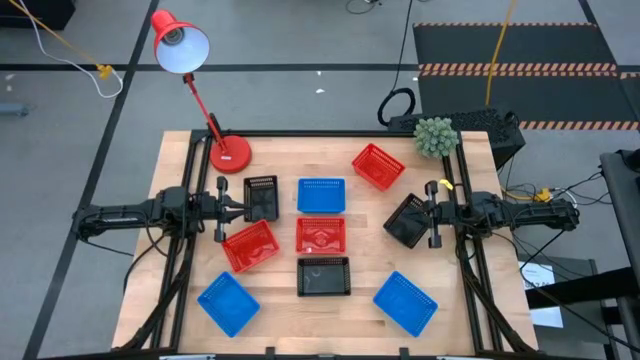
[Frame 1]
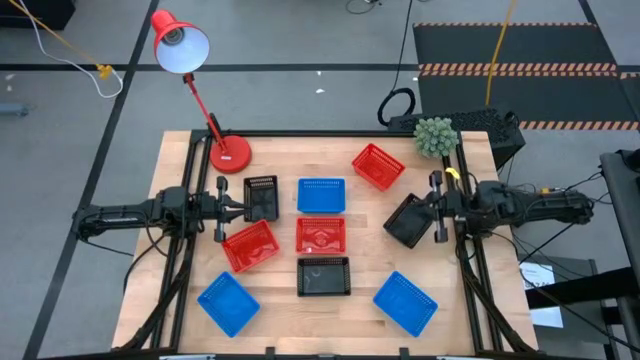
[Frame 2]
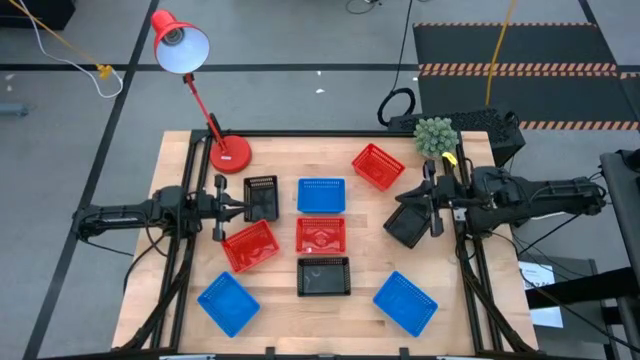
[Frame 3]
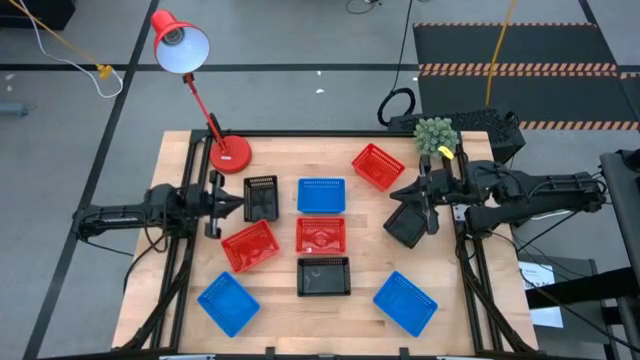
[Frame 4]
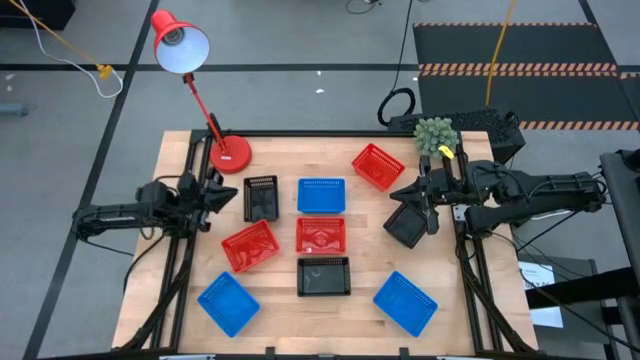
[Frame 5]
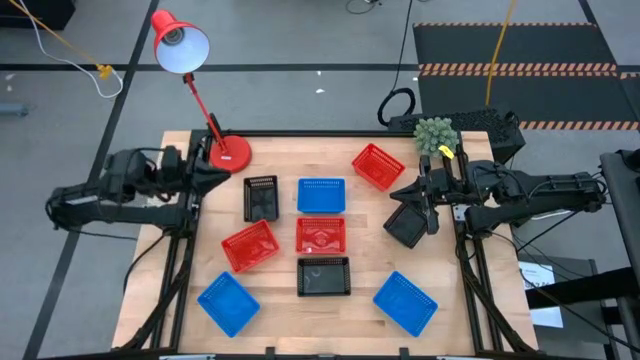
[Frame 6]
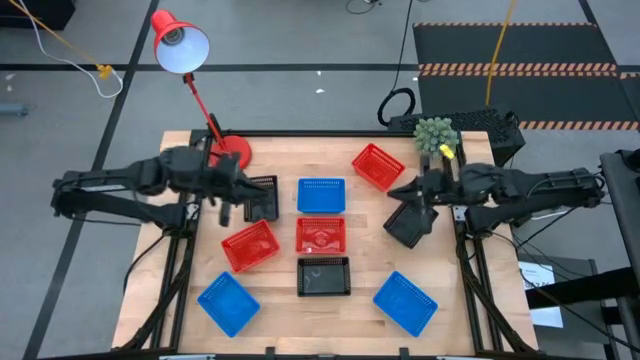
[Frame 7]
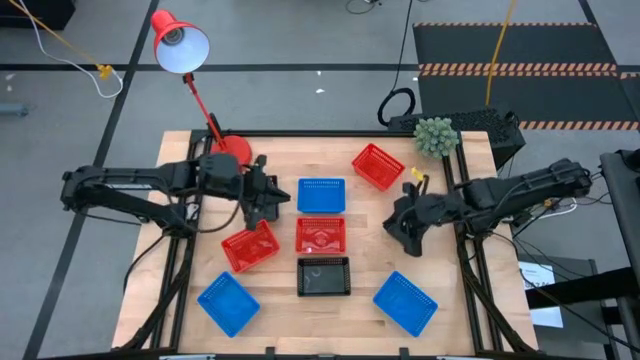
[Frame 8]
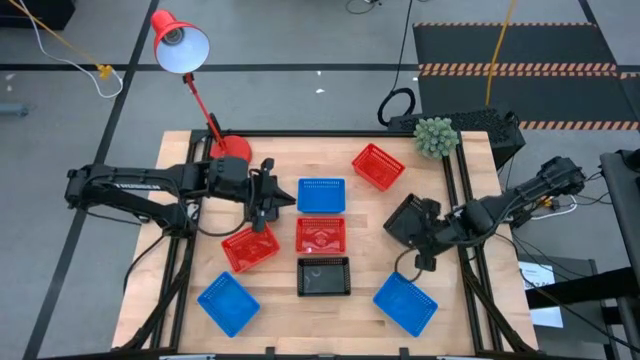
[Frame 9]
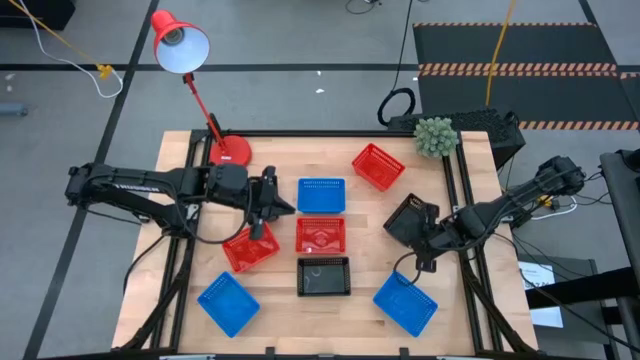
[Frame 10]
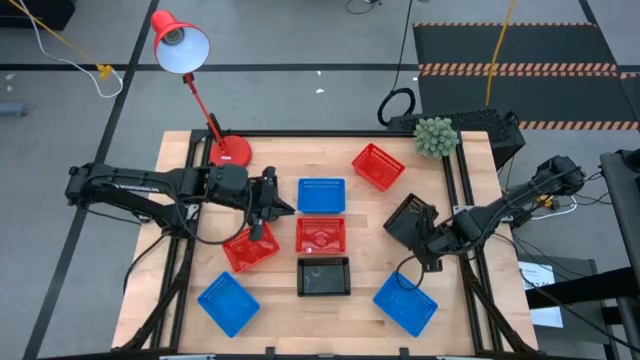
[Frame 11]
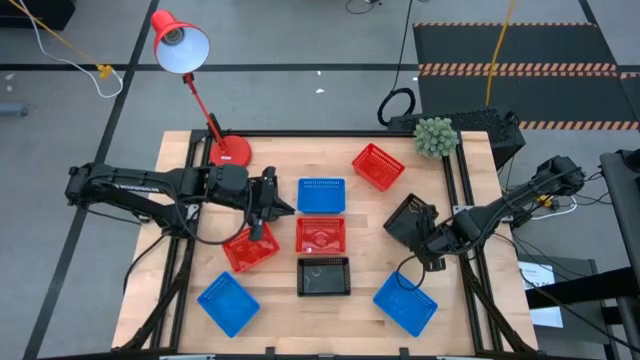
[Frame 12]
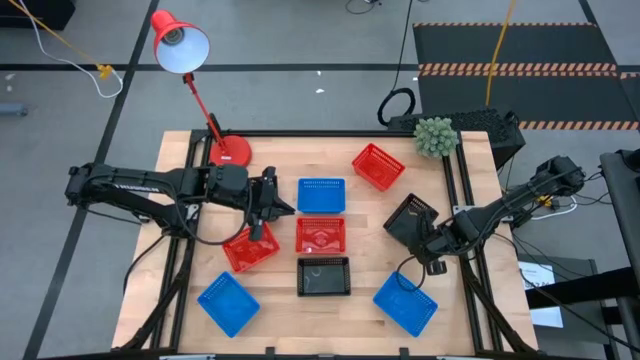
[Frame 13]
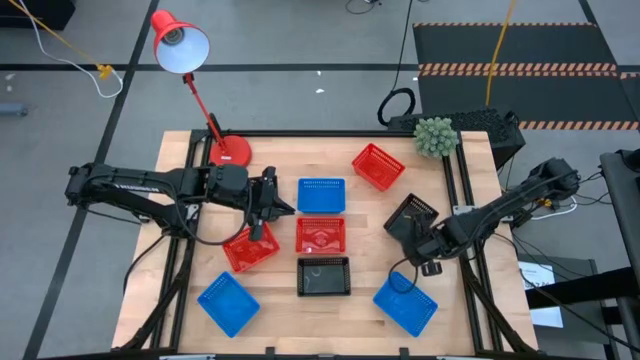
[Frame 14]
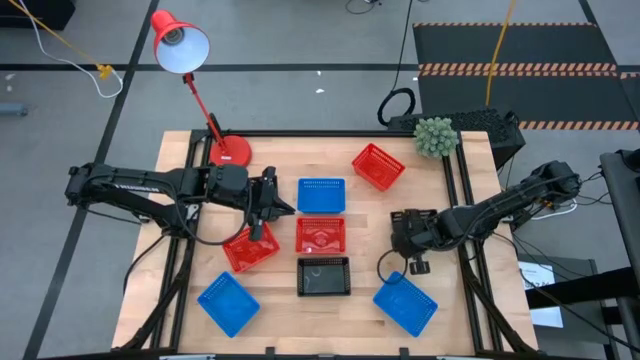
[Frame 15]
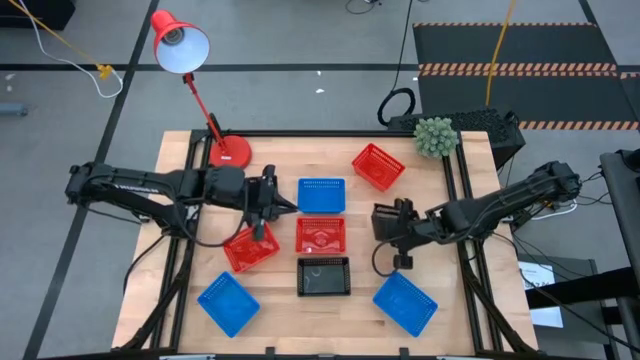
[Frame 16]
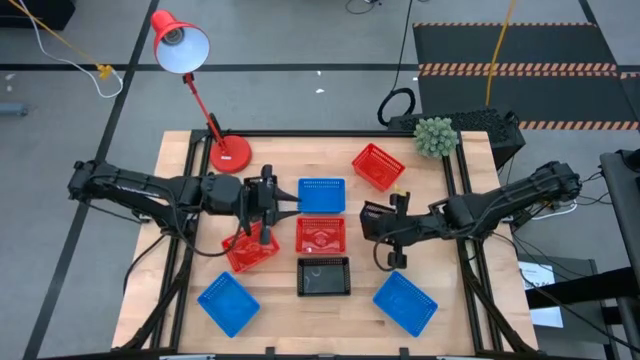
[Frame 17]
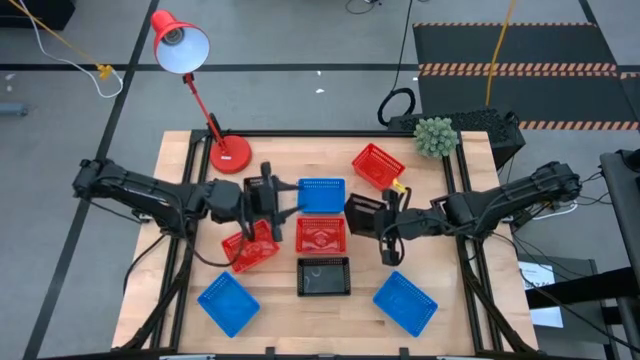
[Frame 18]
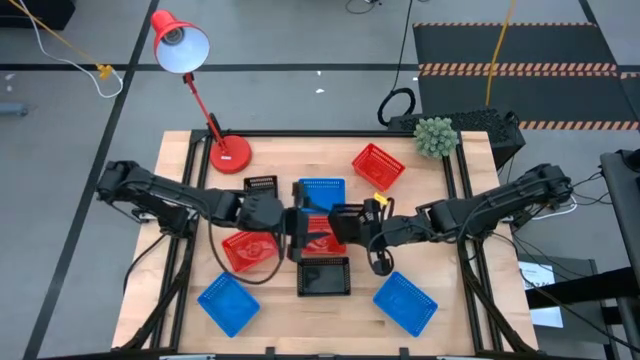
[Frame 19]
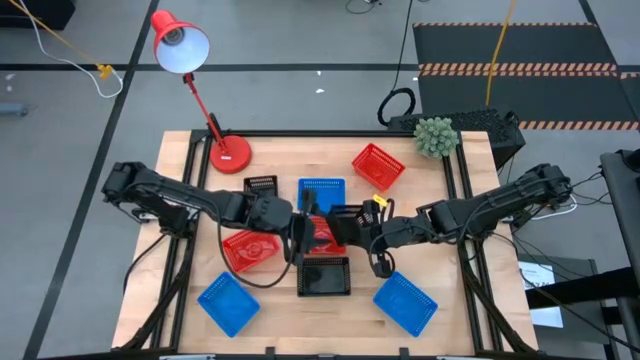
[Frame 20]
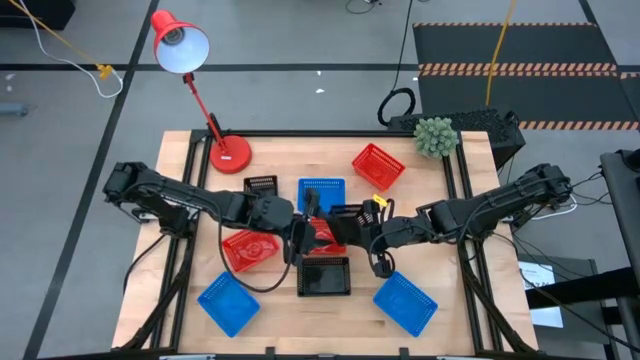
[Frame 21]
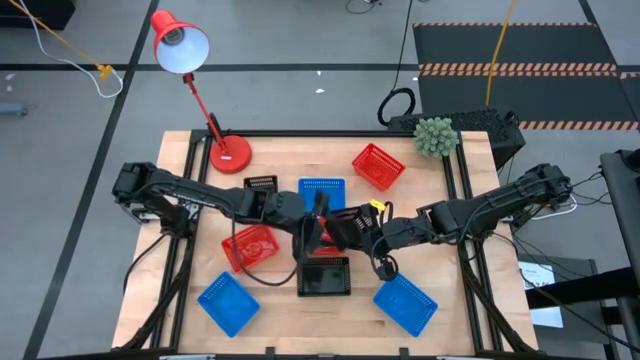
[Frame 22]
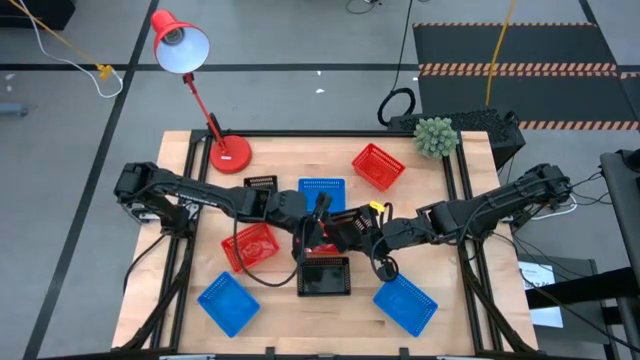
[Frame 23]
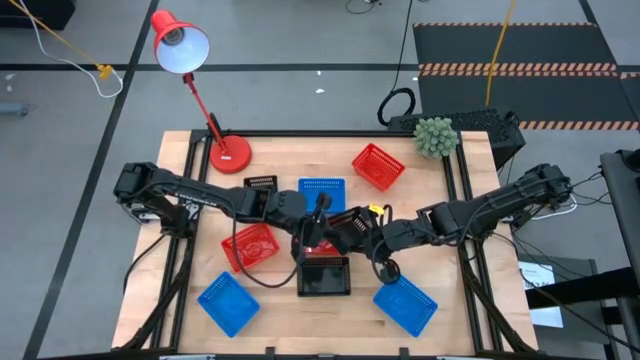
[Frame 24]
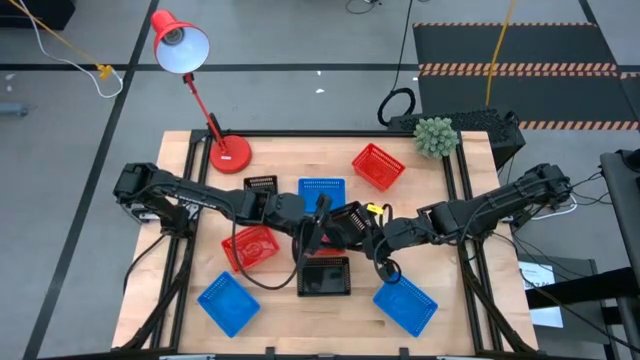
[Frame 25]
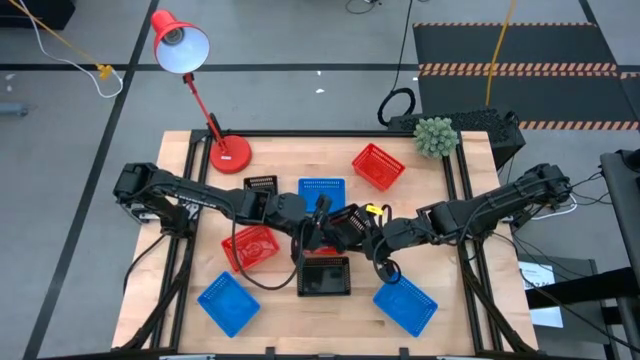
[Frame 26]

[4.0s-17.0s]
Stack the top right black bin on the bottom black bin

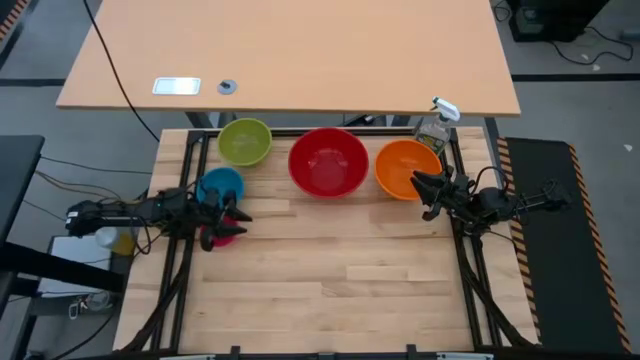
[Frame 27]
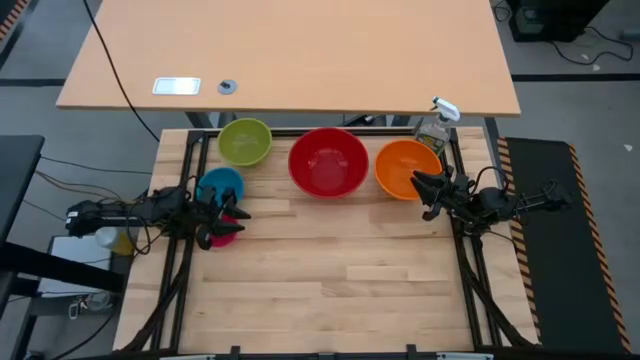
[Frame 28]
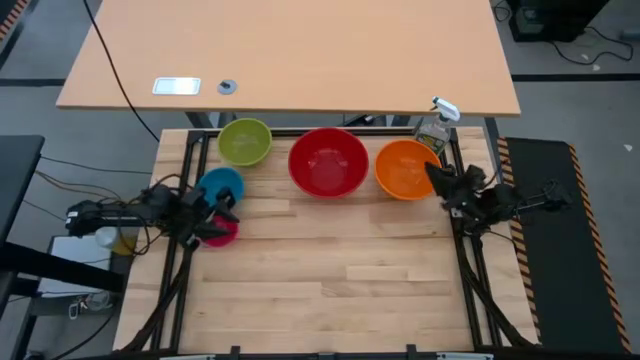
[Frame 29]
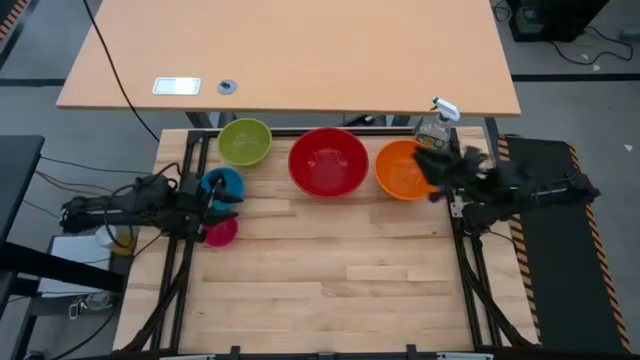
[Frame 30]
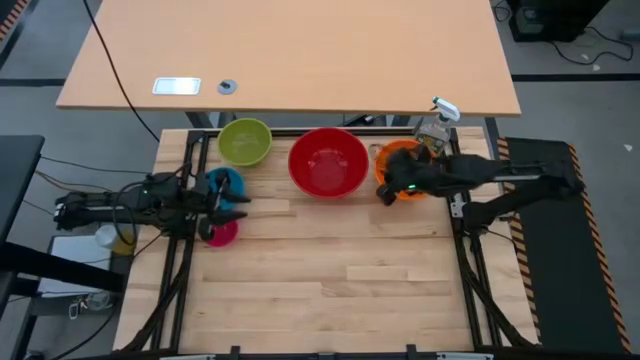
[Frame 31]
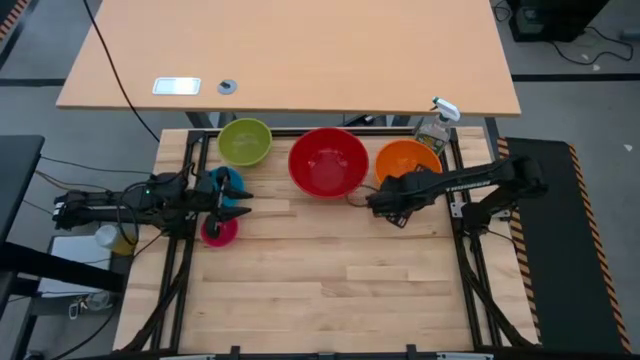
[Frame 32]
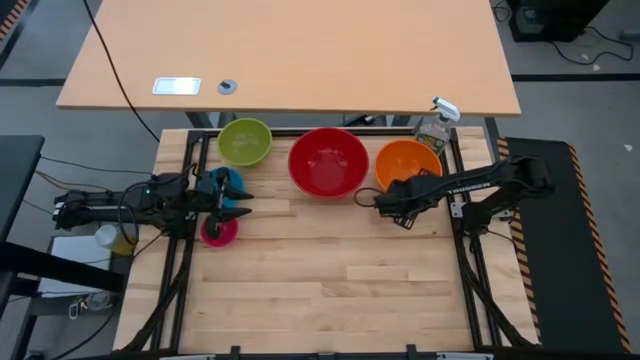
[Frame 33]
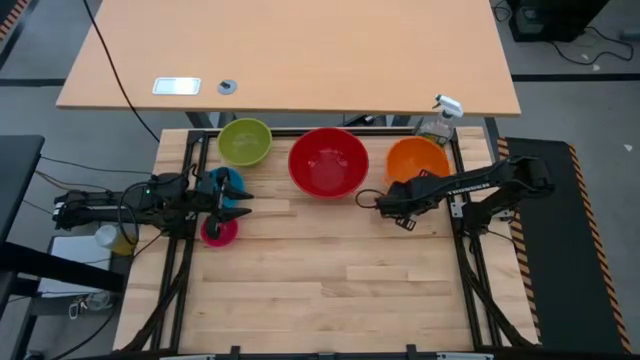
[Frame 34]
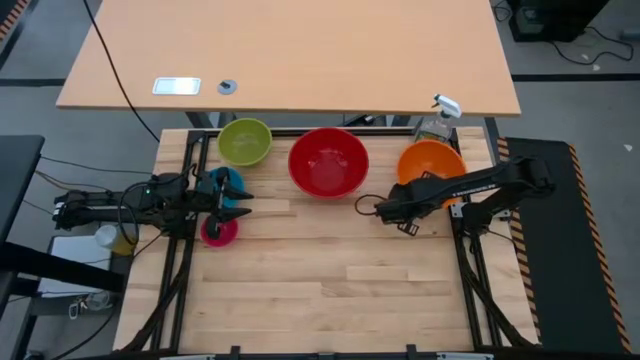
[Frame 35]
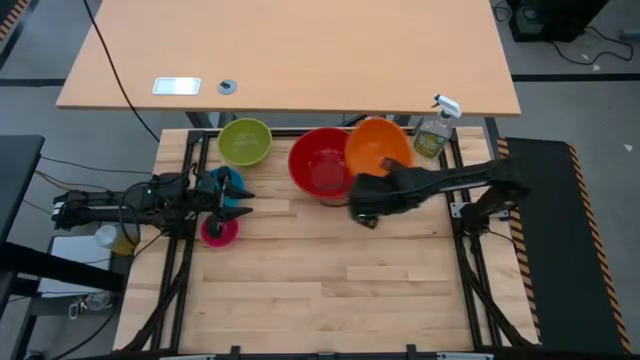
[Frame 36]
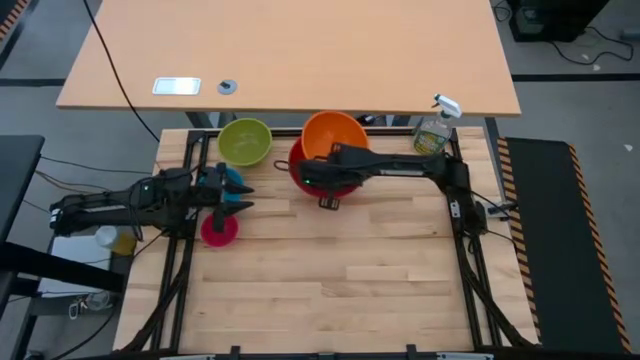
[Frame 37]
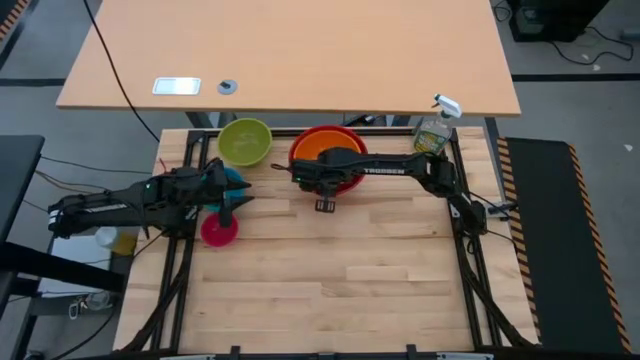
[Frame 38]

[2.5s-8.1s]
Stack the orange bowl on top of the red bowl

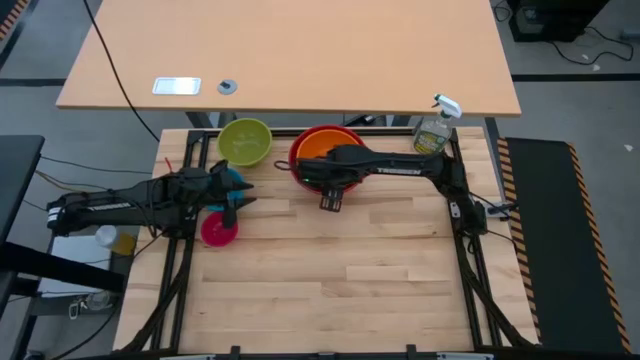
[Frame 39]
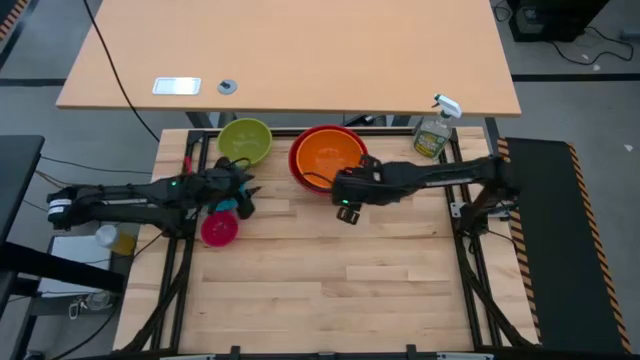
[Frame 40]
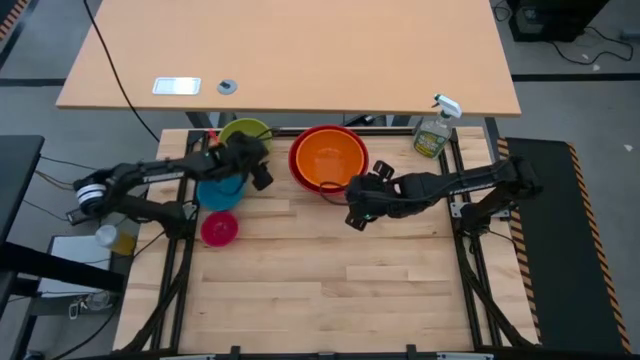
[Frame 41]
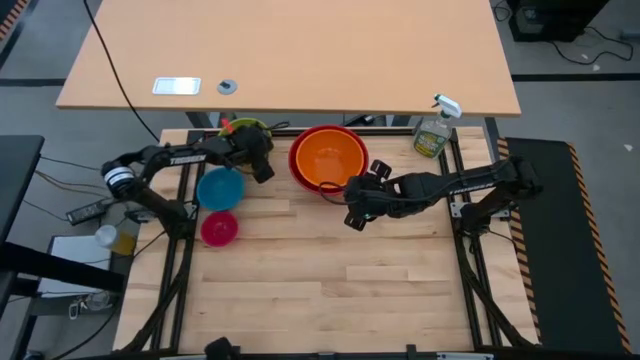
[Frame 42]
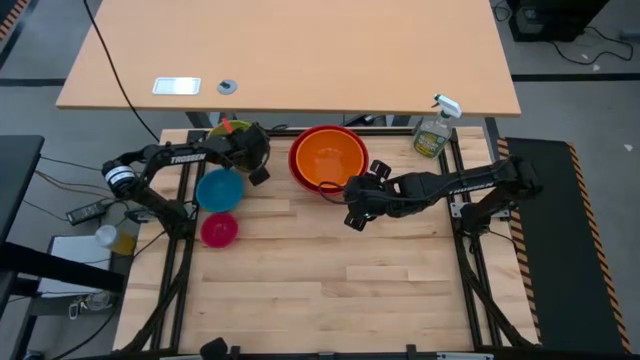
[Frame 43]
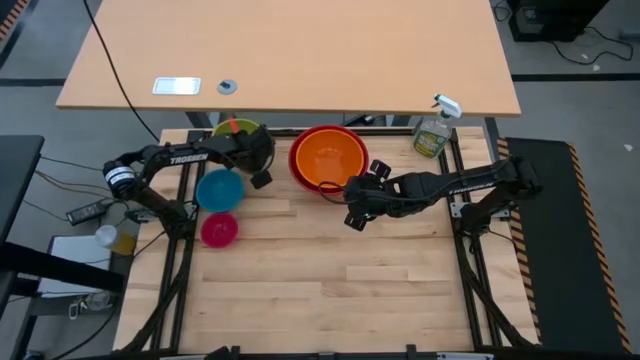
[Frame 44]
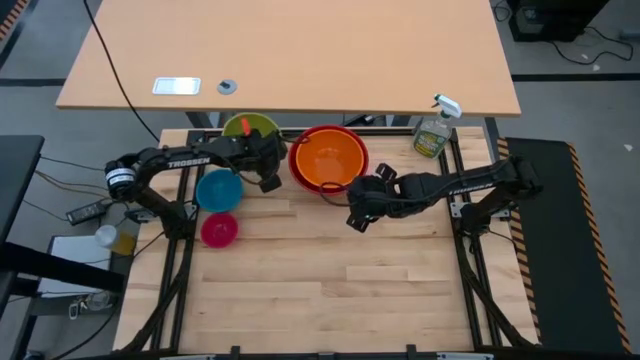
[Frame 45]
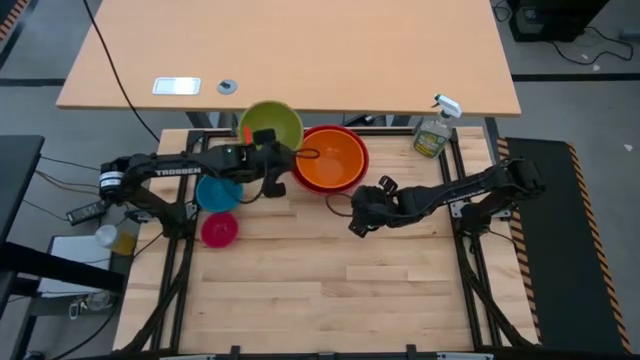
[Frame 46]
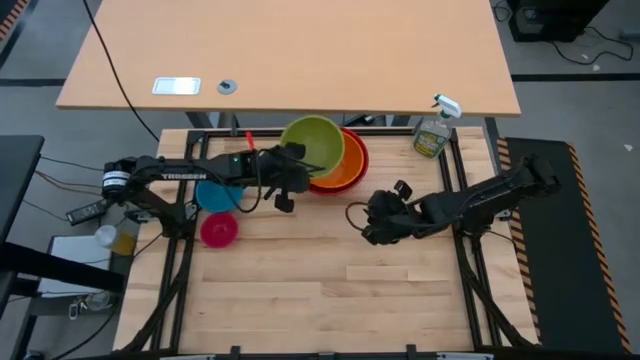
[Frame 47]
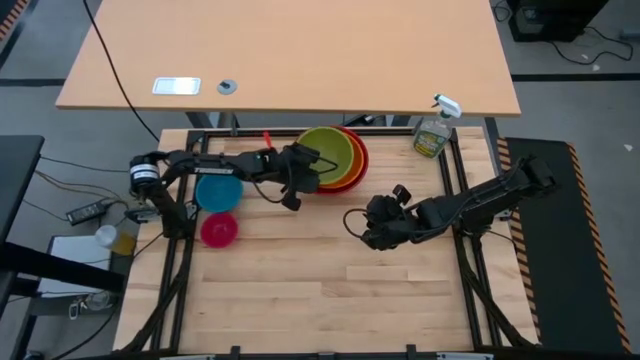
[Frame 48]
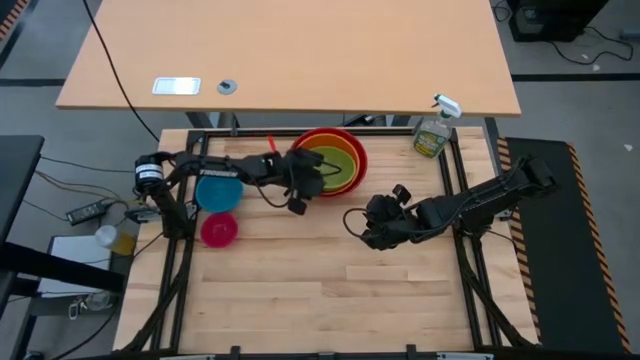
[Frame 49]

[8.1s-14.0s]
Stack the green bowl on top of the orange bowl
